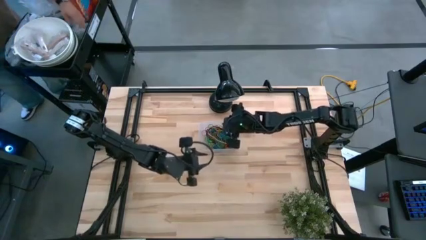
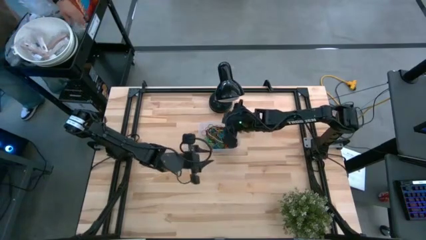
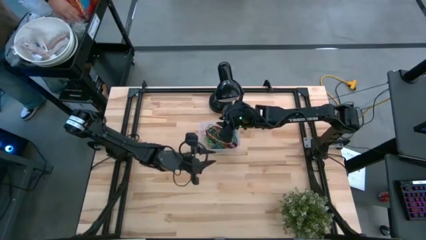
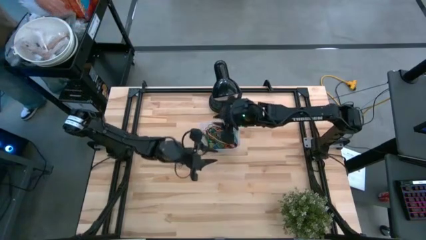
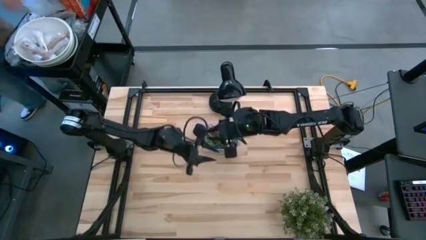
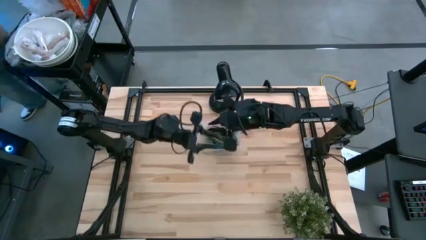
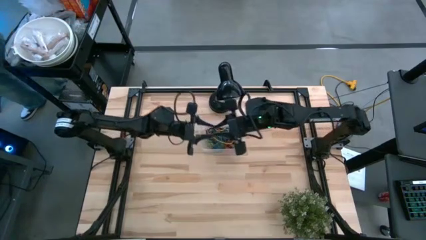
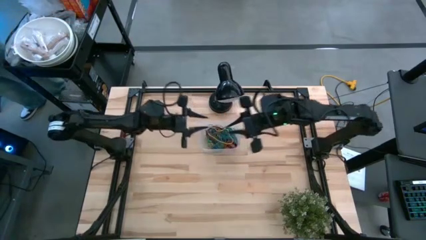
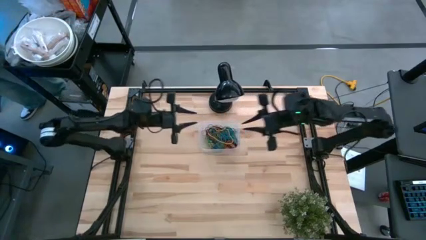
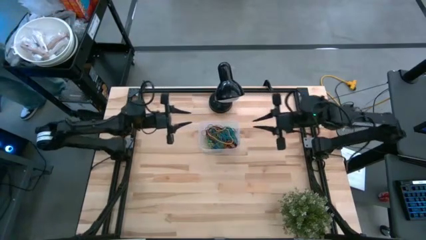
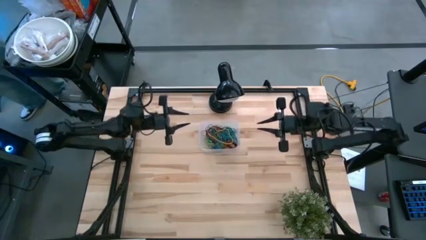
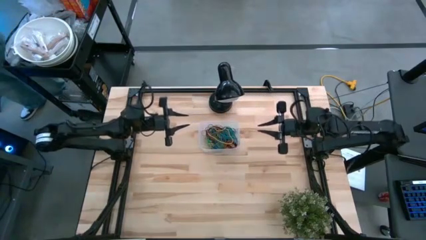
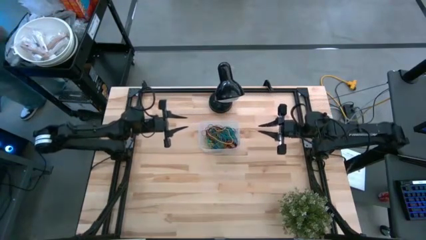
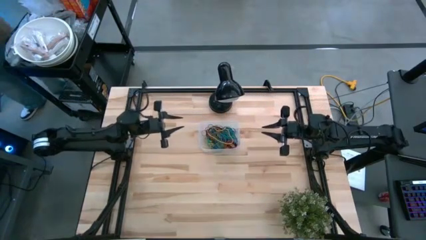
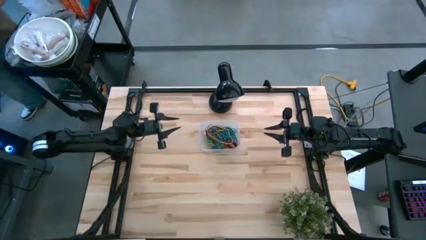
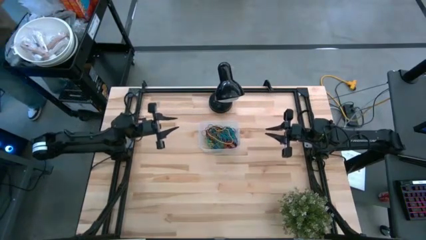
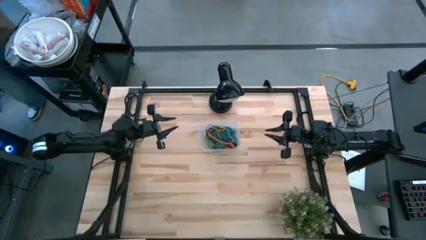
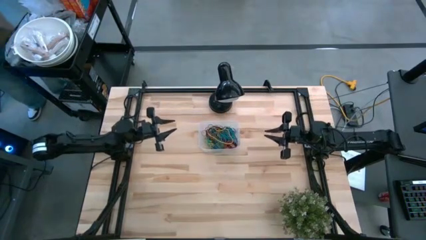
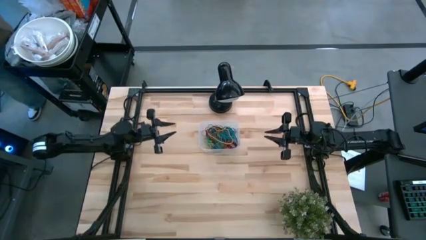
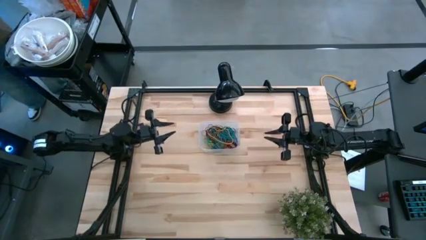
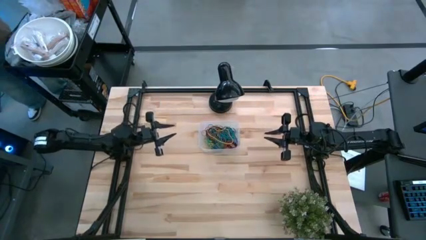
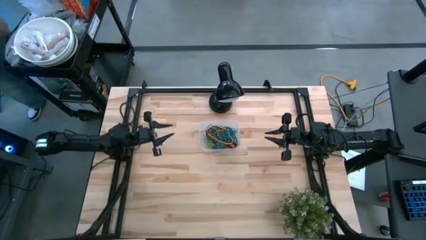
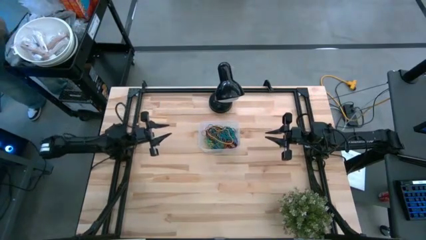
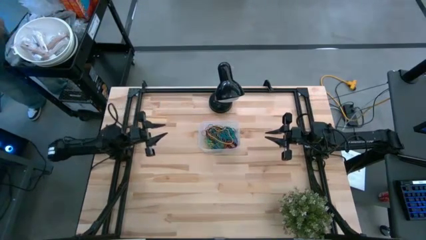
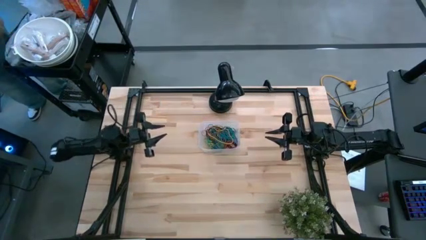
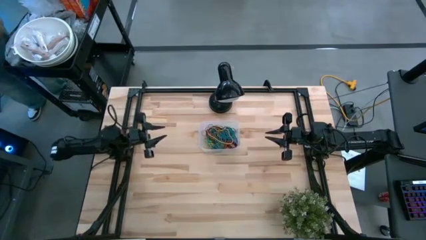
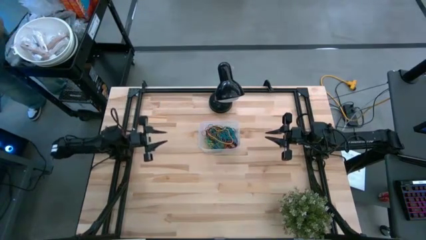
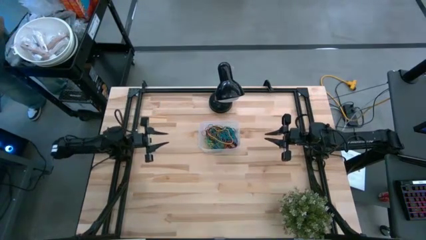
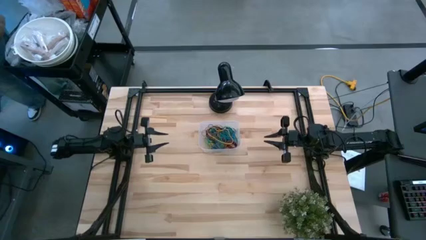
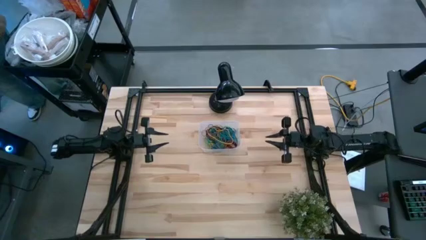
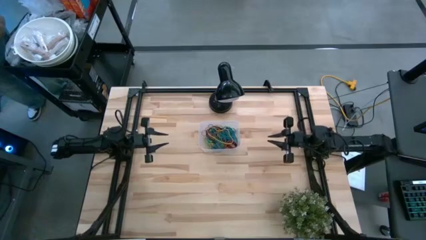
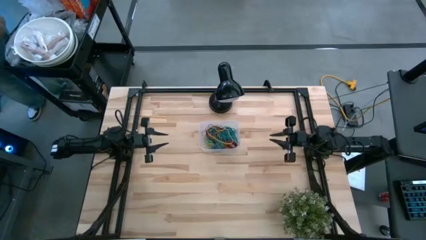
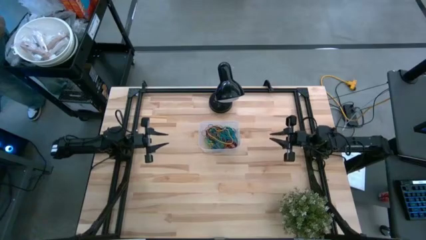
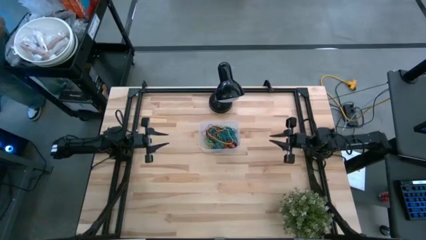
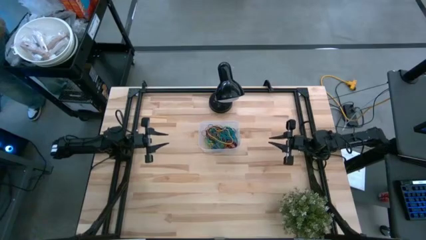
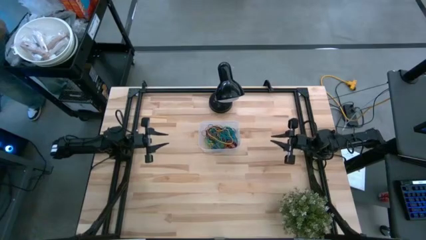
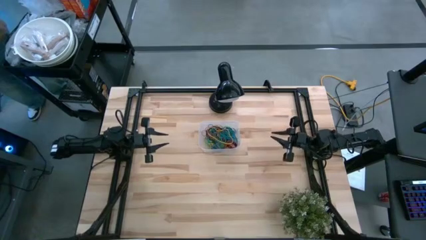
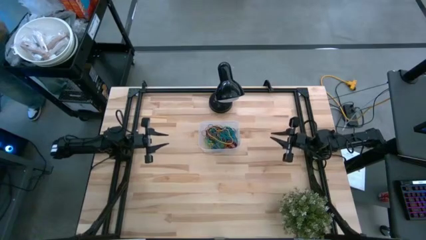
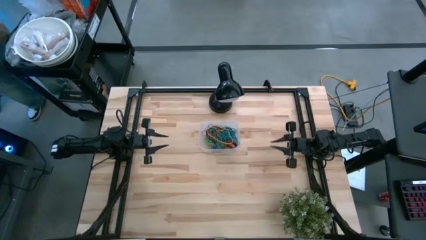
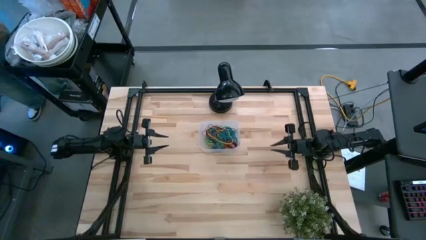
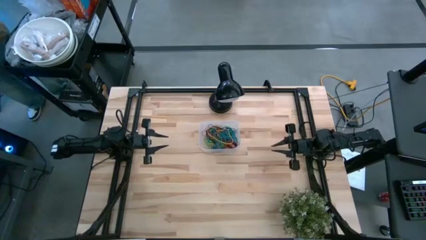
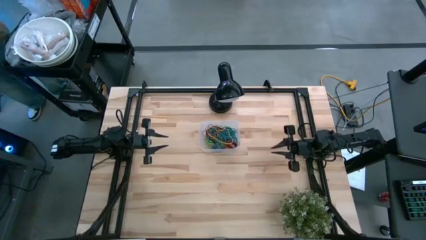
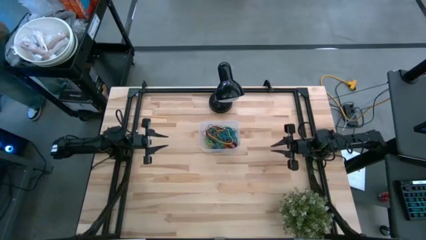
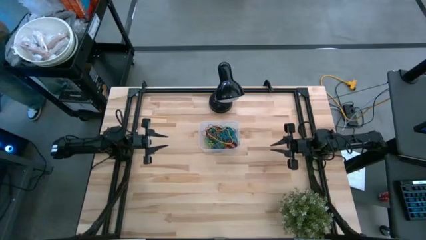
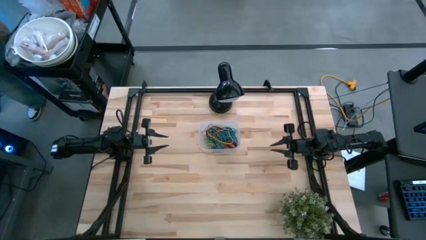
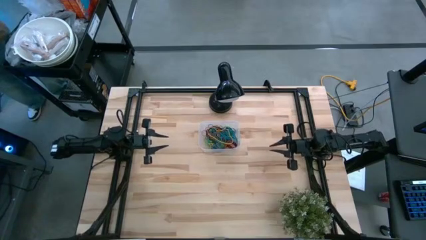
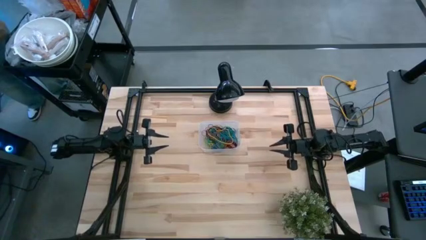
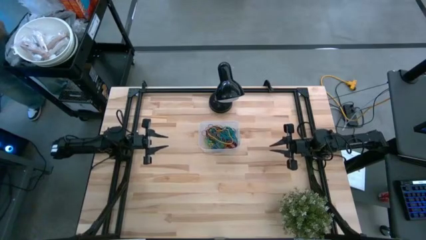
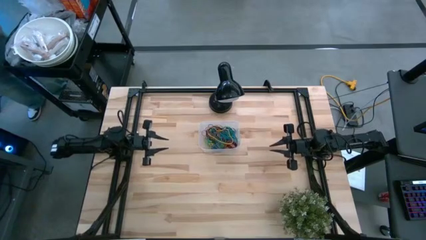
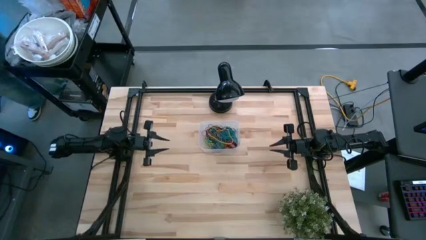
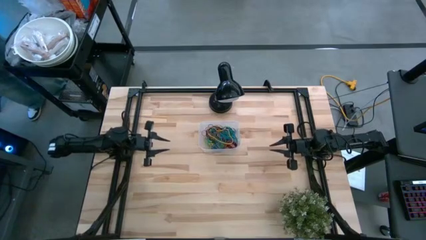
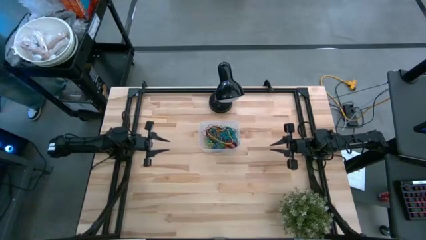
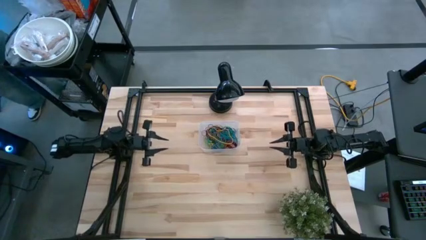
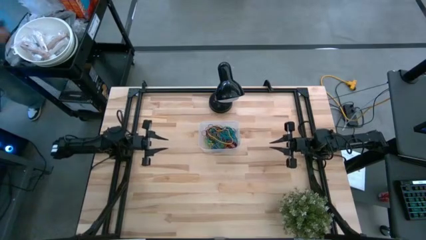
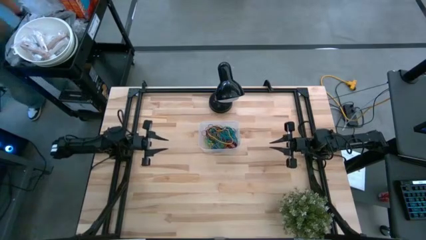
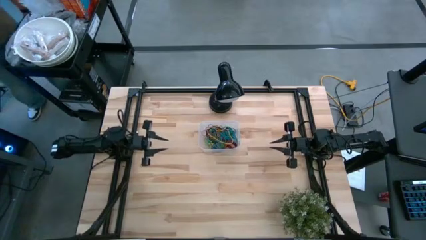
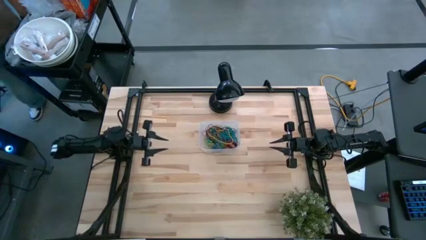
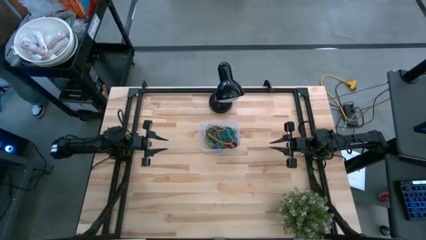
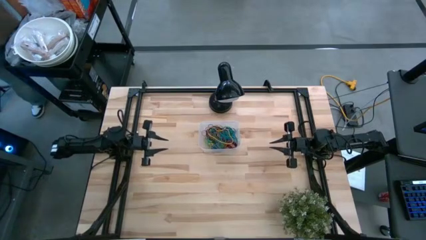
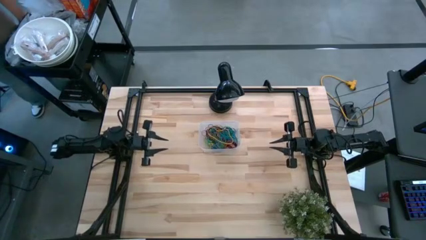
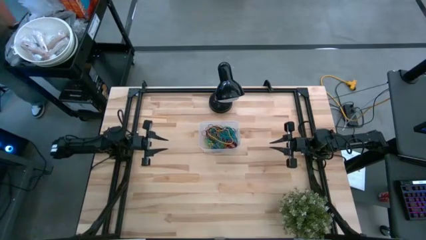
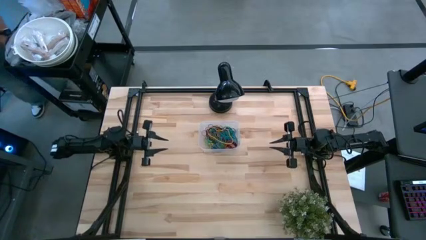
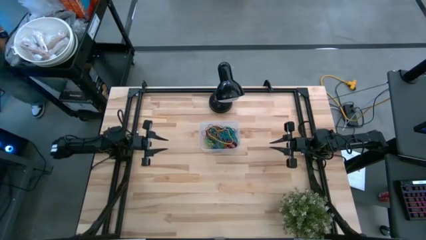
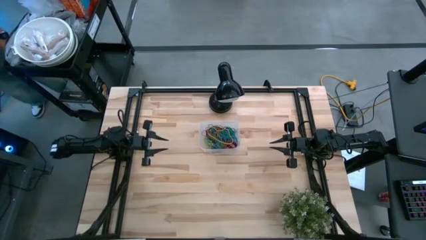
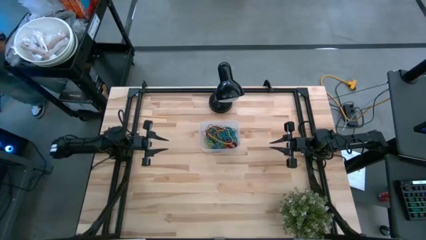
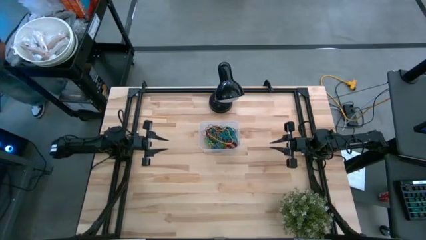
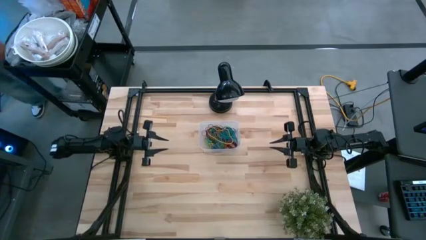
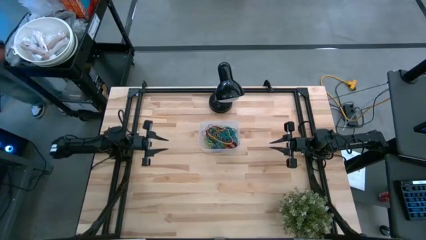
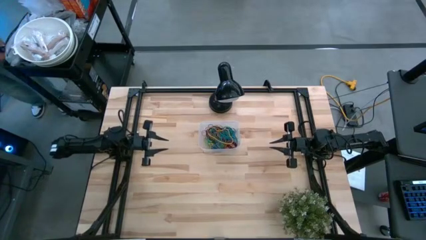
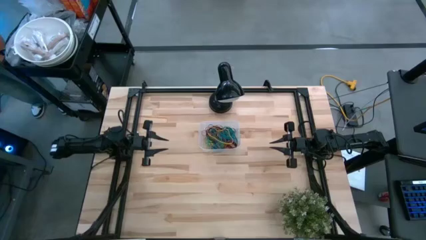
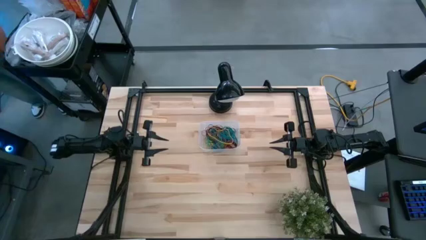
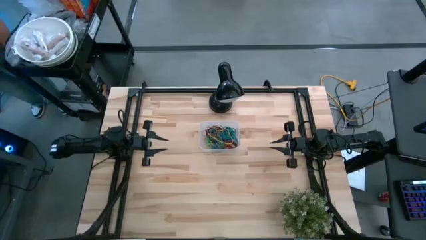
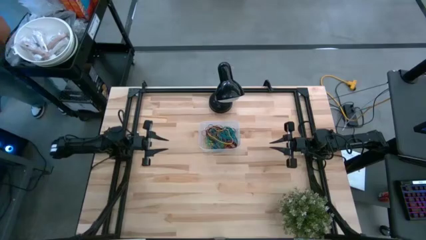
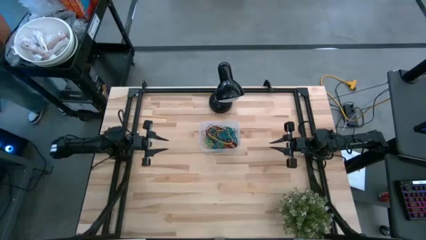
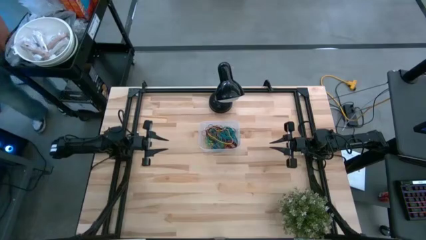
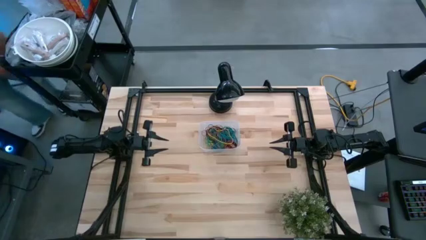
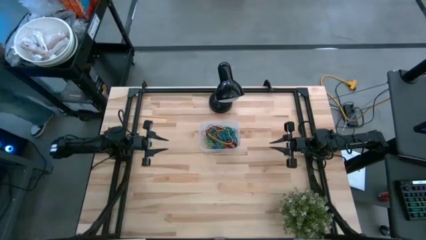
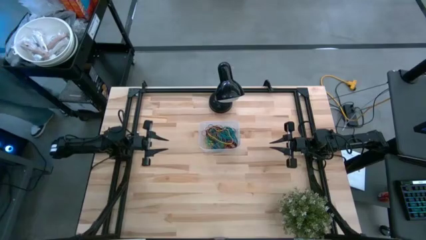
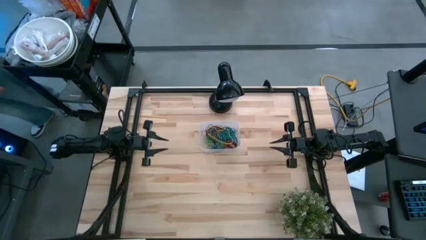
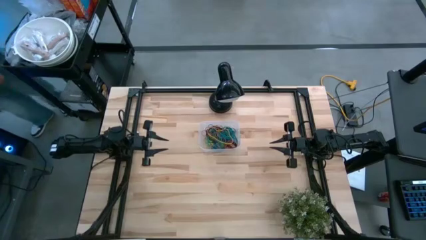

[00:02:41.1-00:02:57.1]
Task: Pick and place rubber bands into bin
Return to Home Position
